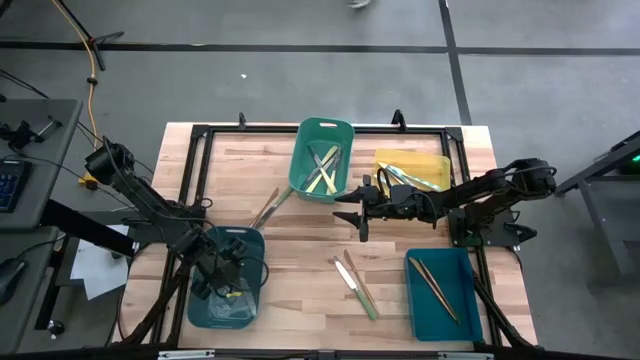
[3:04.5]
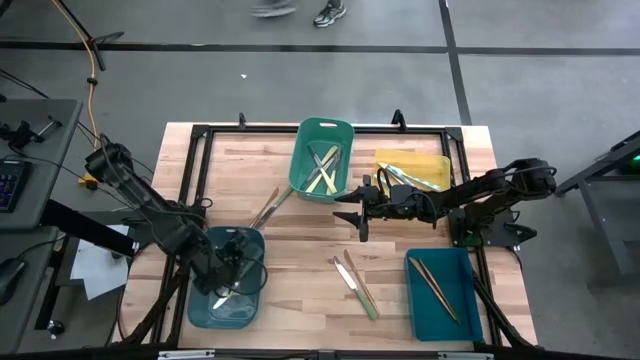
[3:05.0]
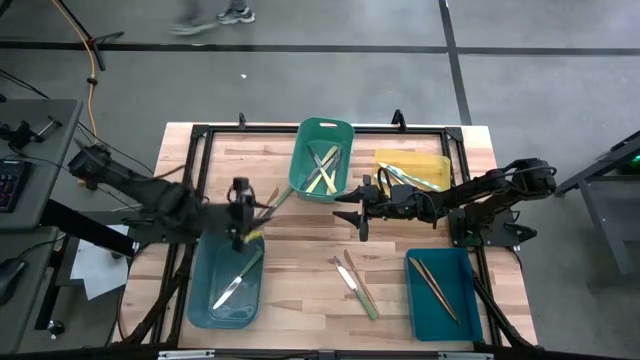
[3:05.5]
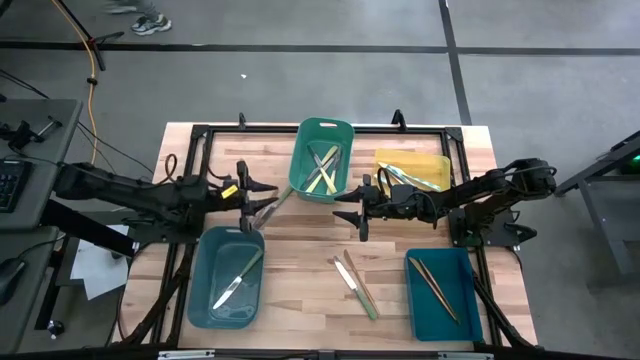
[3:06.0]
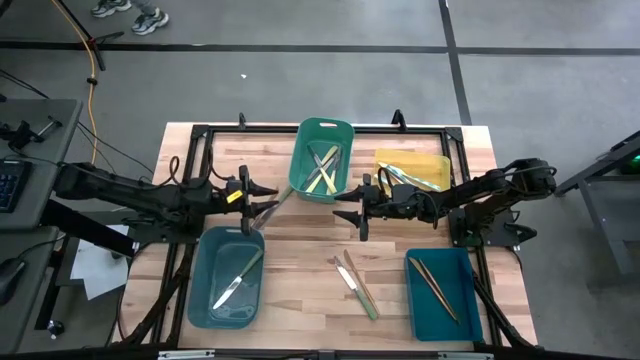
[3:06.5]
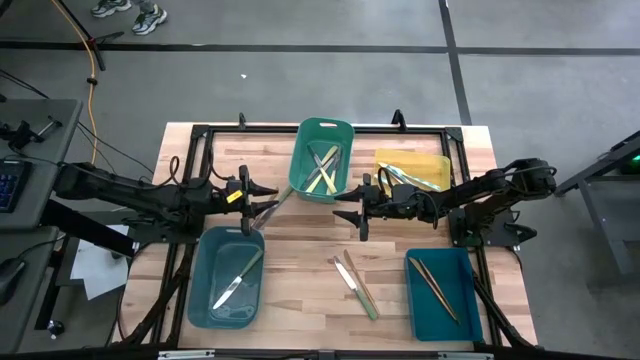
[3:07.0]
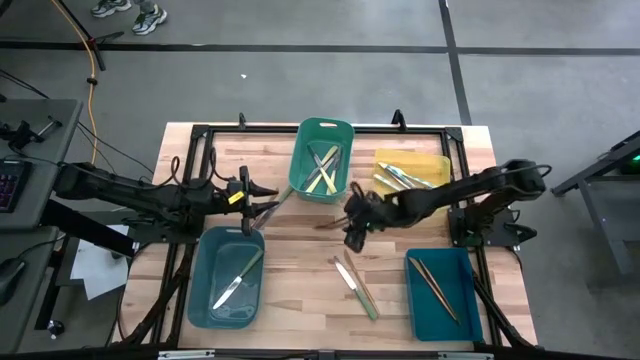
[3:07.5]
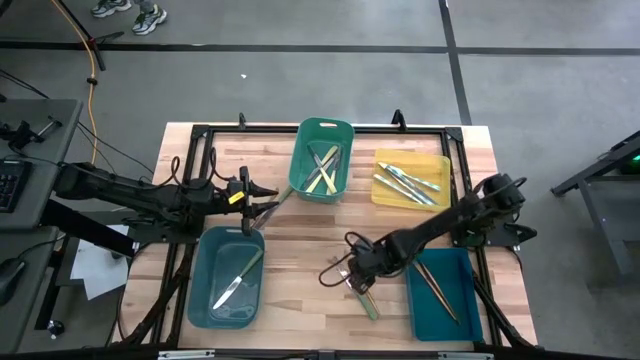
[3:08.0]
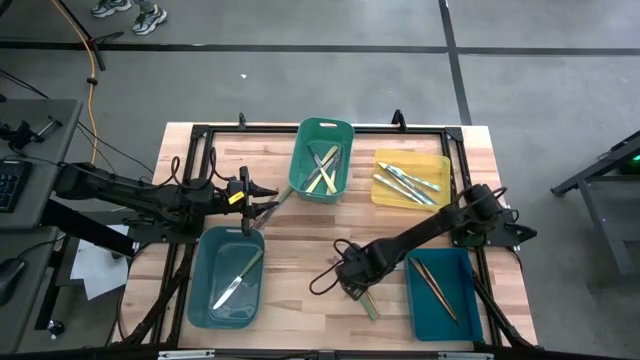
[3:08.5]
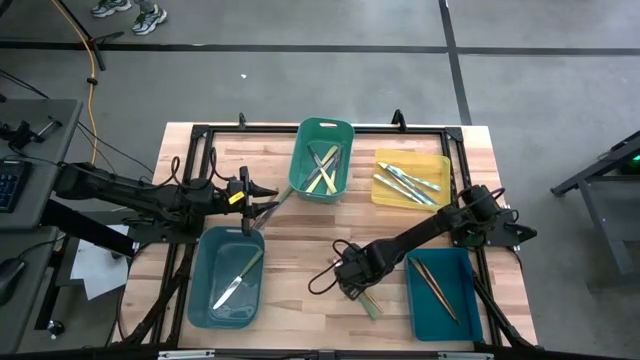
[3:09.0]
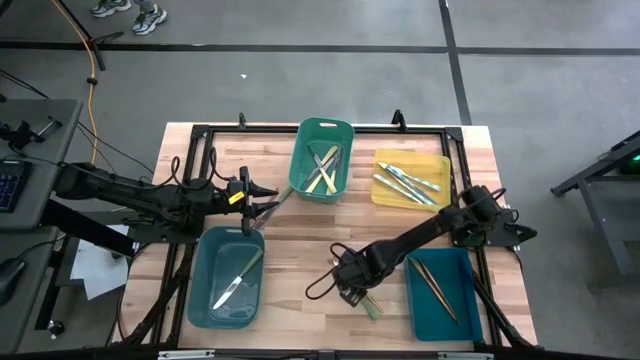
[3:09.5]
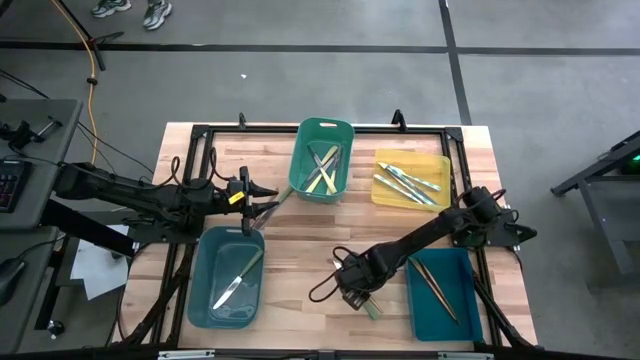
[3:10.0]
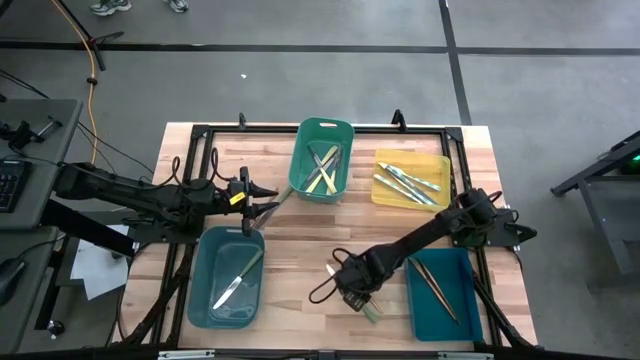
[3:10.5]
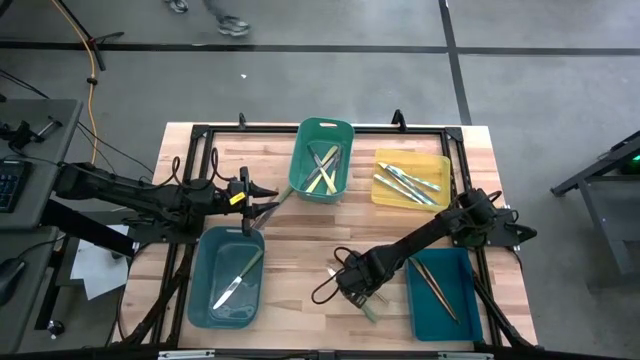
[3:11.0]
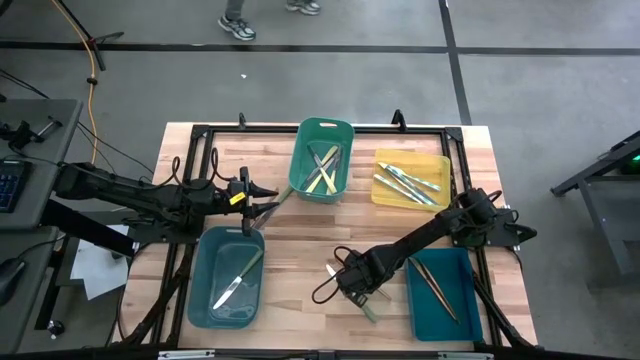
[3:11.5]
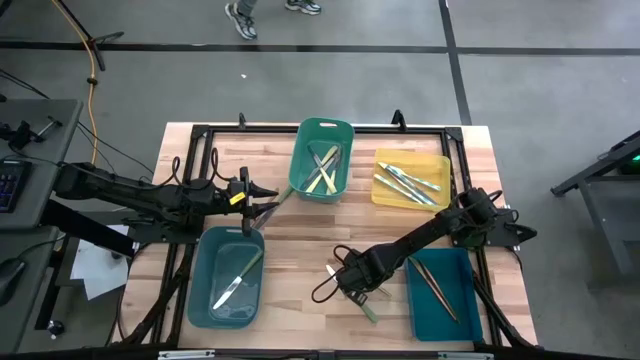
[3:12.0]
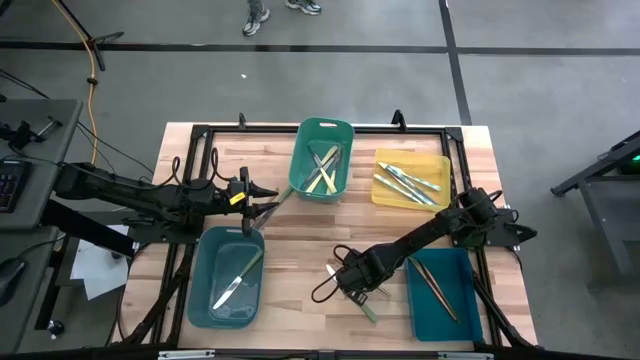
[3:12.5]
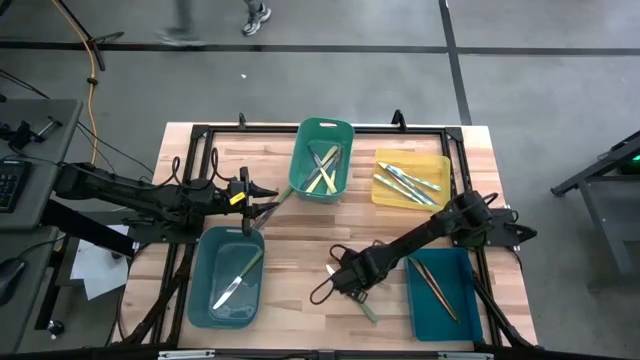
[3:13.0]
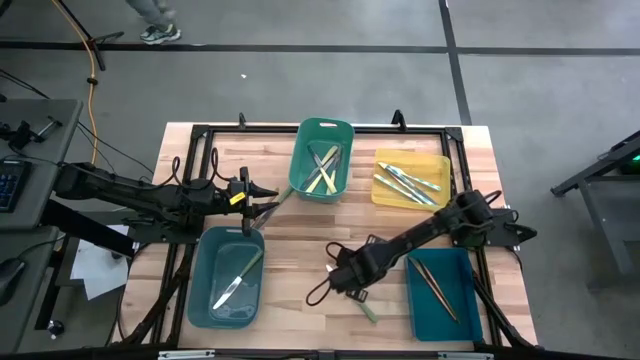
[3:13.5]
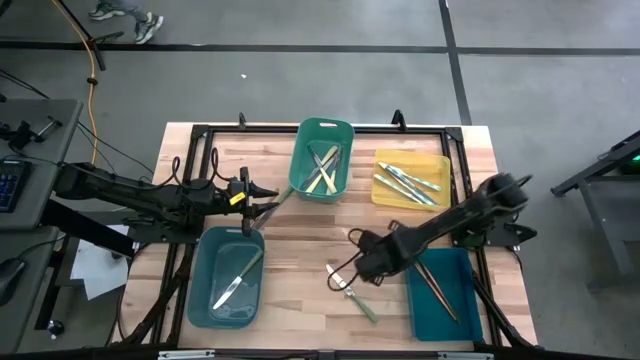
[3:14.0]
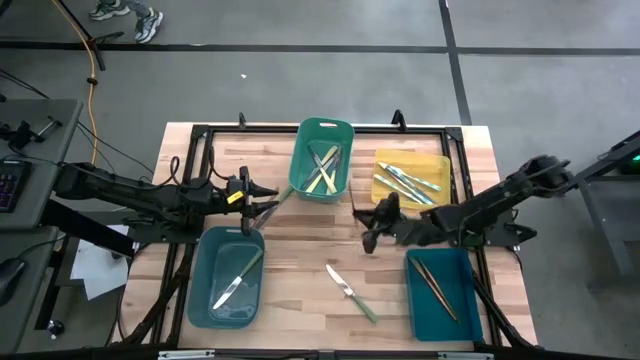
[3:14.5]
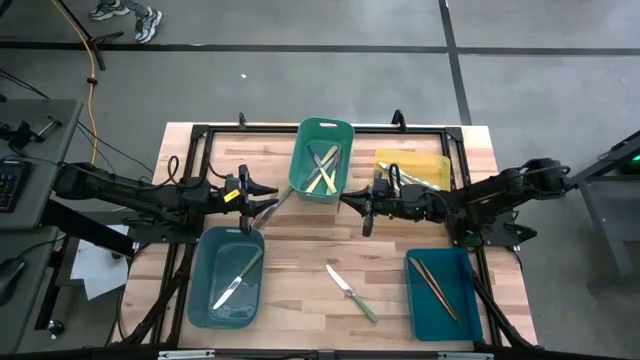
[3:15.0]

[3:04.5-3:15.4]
Task: Sort silverware by color (type)
Put the gold knife into the right blue bin

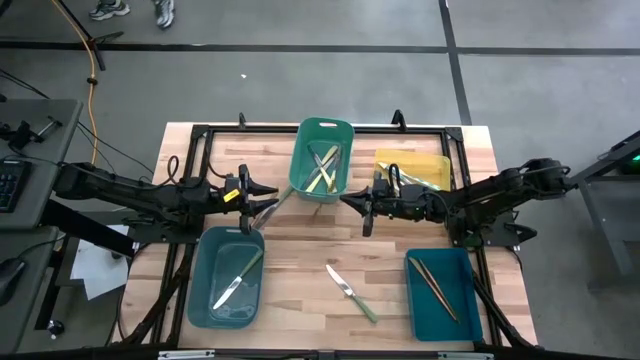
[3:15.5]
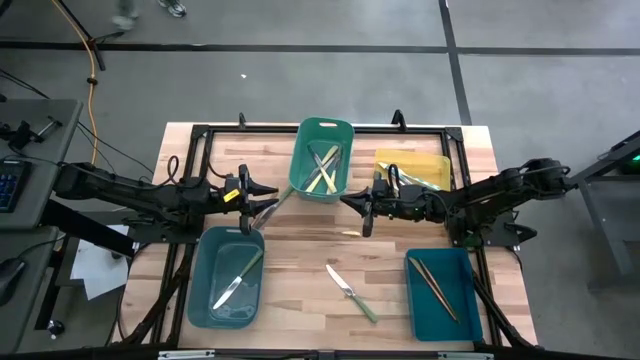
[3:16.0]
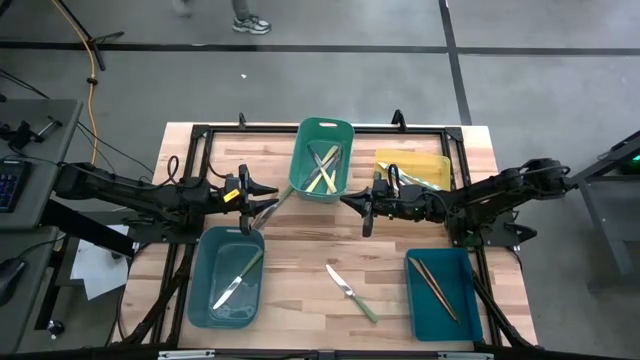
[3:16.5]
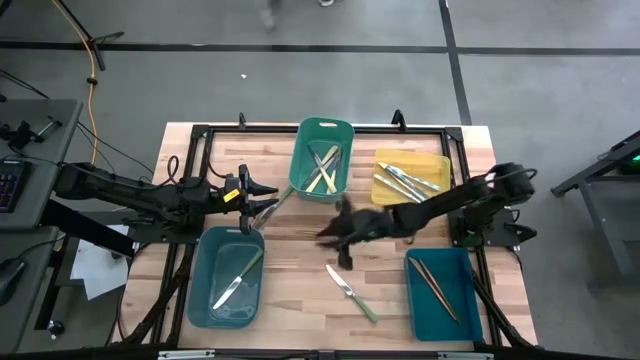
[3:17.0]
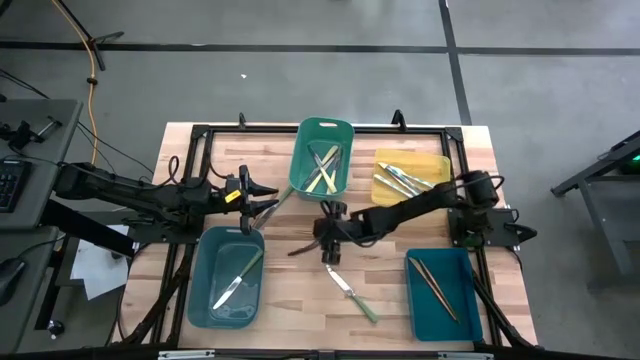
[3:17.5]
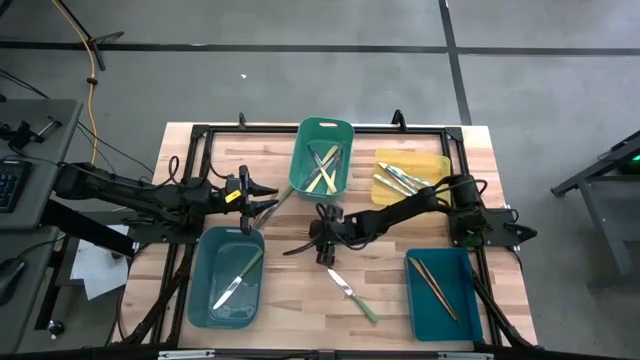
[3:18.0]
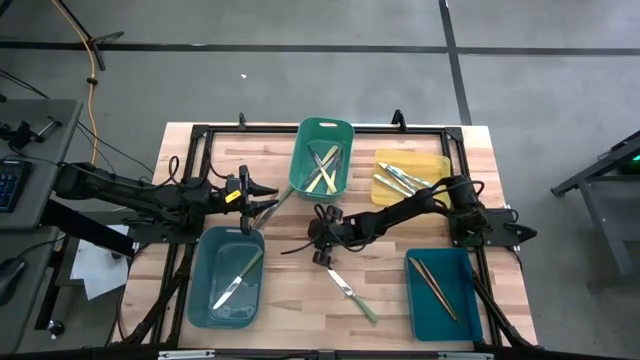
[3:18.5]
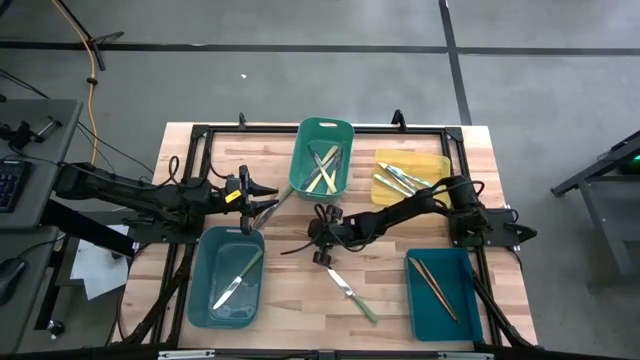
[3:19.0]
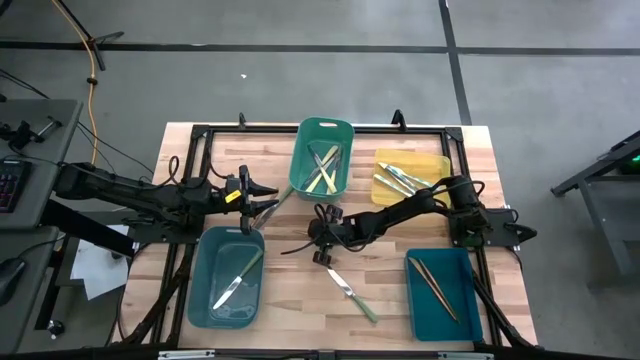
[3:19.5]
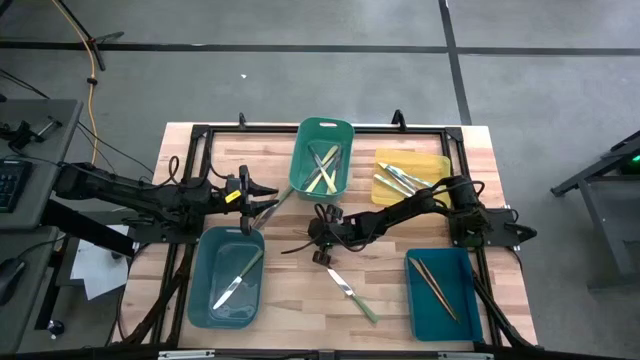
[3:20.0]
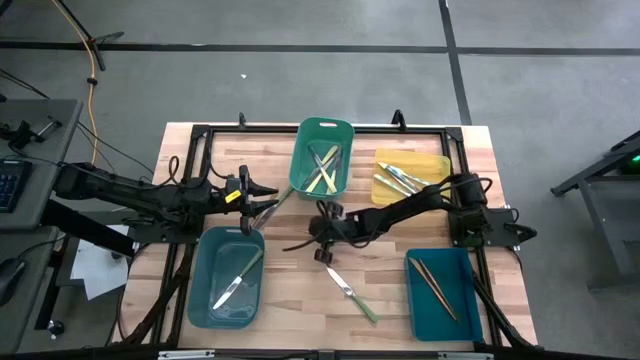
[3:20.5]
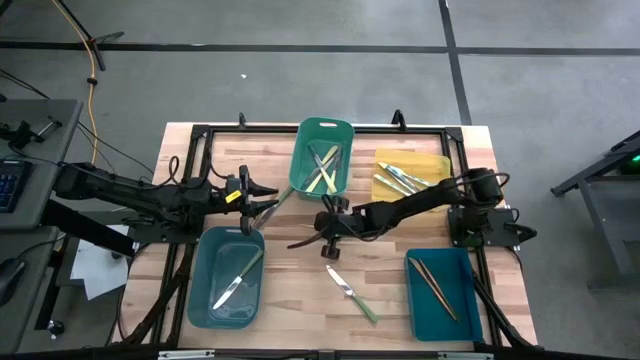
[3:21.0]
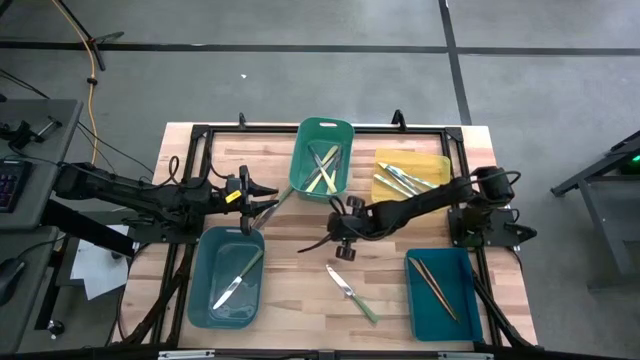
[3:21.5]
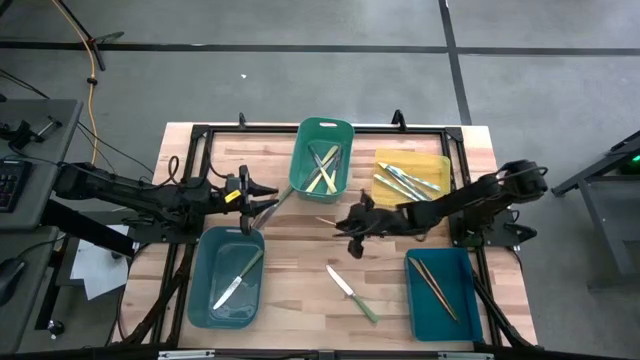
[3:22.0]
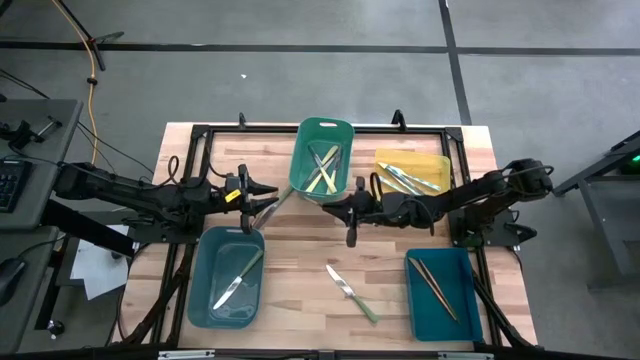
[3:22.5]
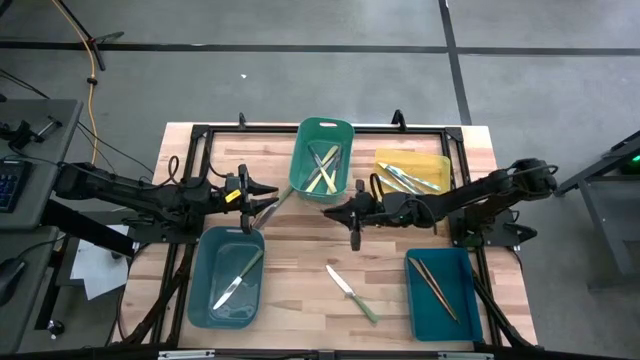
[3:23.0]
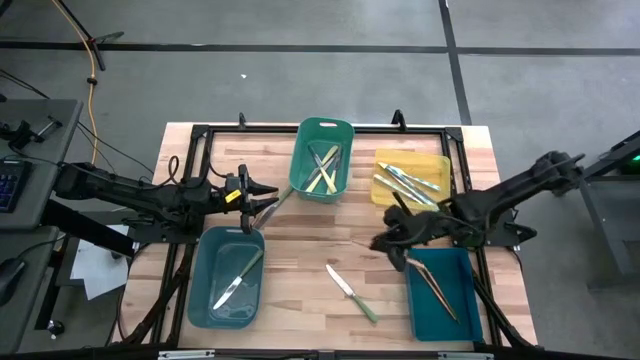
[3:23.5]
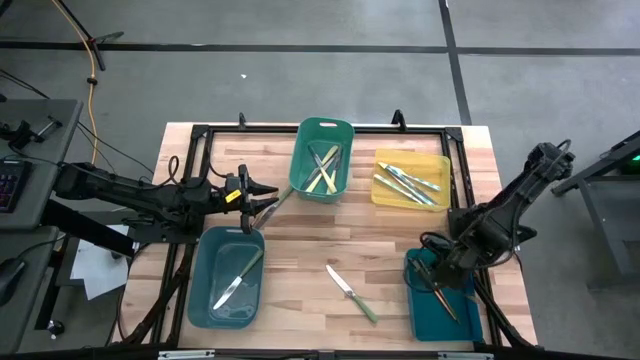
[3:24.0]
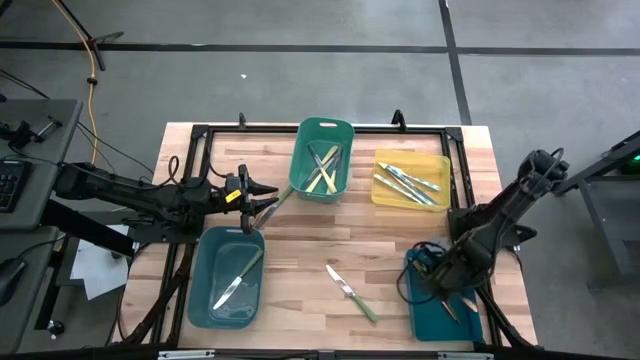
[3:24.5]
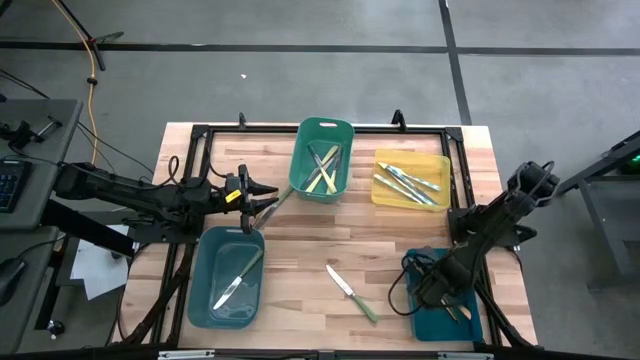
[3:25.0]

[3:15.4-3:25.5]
Put the gold knife into the right blue bin
